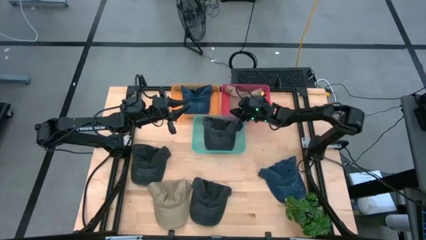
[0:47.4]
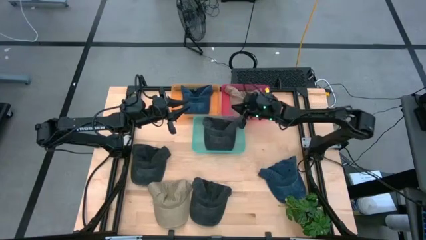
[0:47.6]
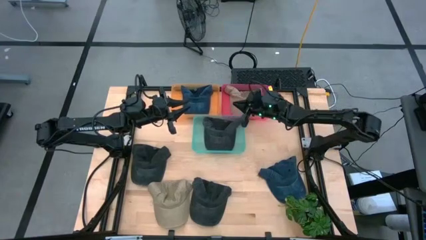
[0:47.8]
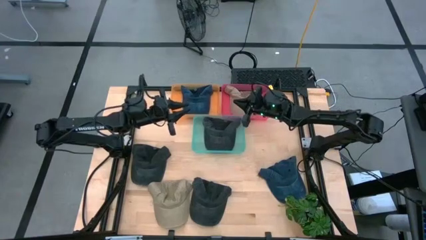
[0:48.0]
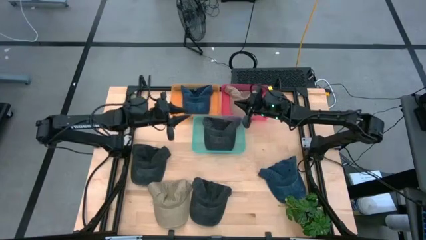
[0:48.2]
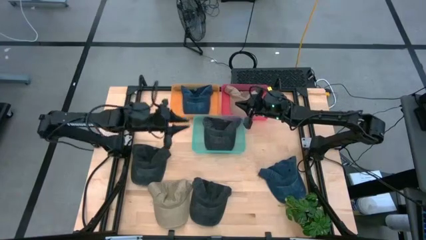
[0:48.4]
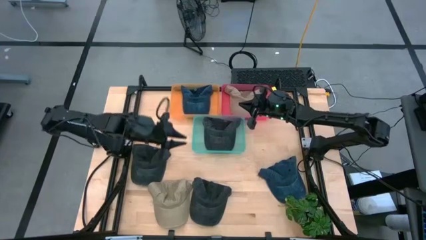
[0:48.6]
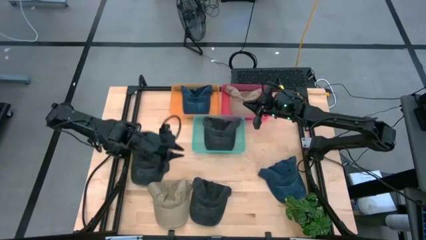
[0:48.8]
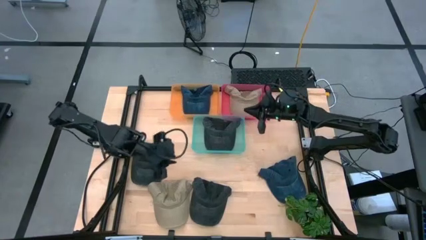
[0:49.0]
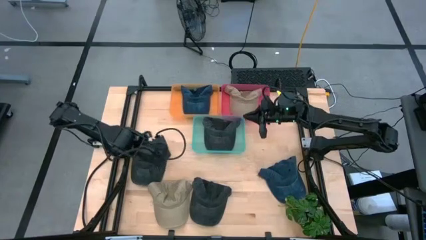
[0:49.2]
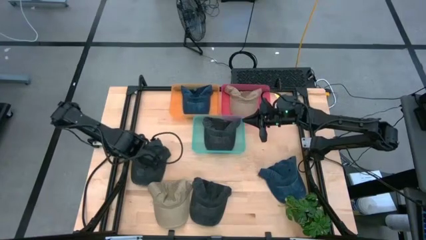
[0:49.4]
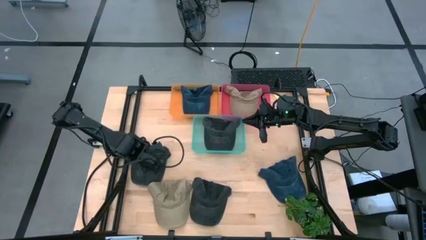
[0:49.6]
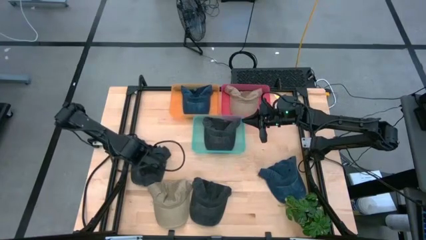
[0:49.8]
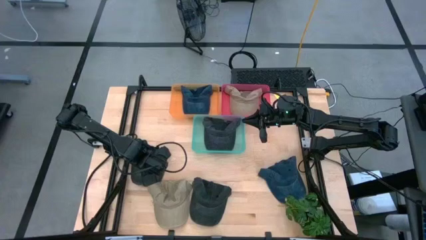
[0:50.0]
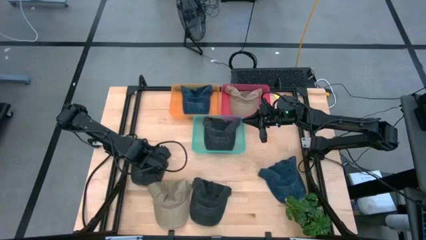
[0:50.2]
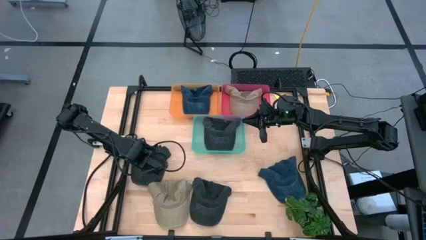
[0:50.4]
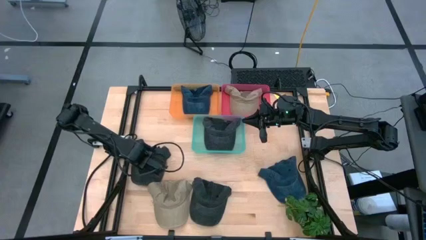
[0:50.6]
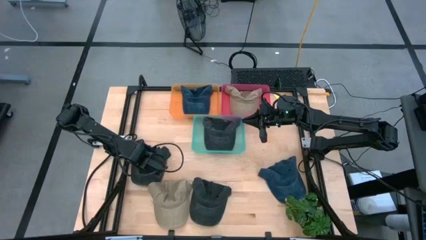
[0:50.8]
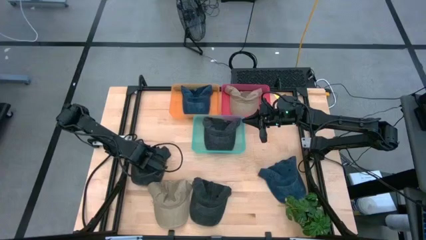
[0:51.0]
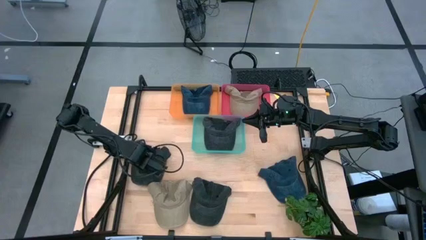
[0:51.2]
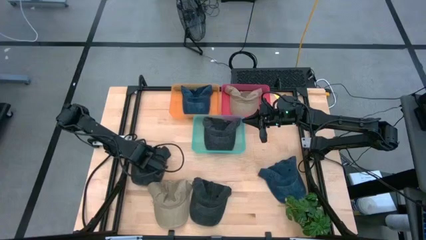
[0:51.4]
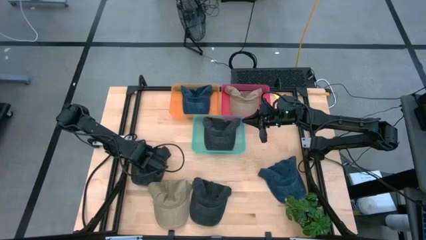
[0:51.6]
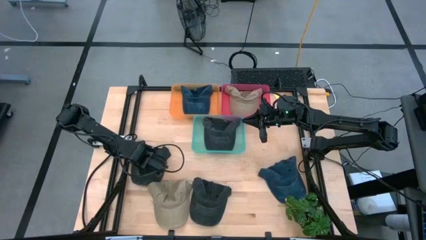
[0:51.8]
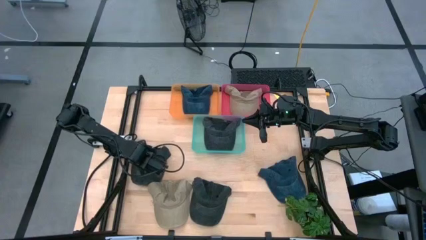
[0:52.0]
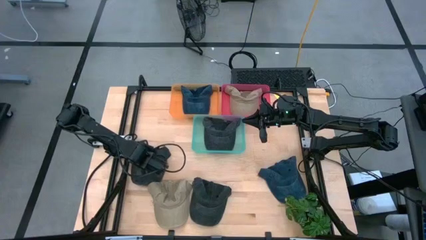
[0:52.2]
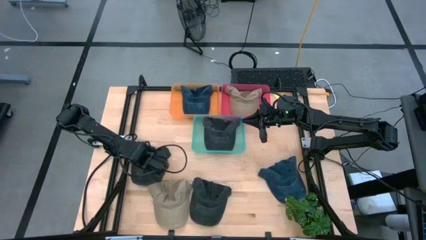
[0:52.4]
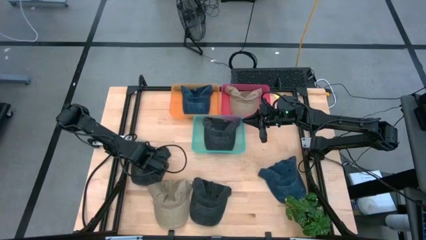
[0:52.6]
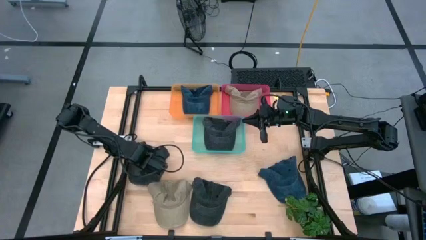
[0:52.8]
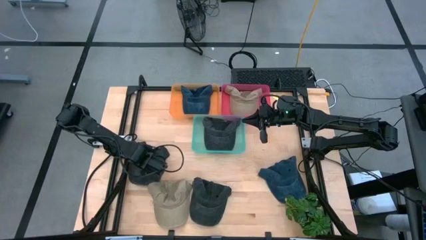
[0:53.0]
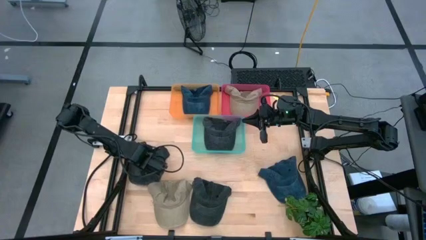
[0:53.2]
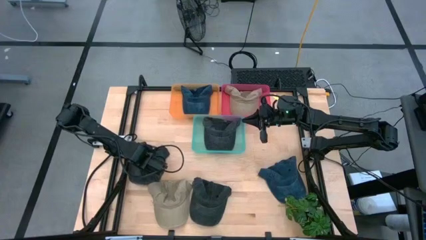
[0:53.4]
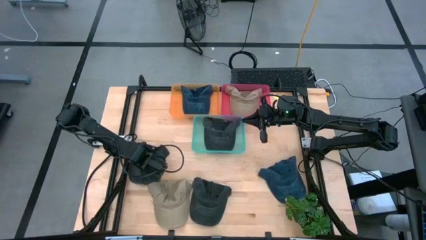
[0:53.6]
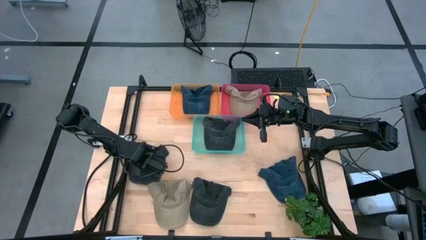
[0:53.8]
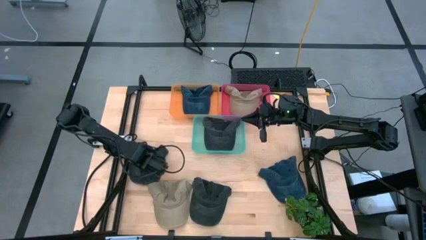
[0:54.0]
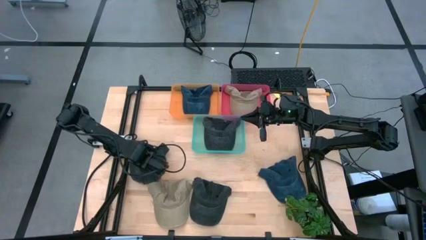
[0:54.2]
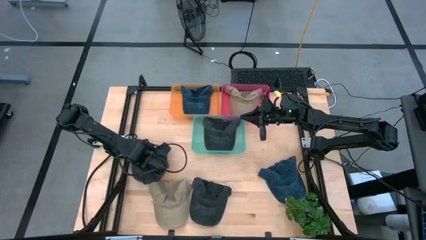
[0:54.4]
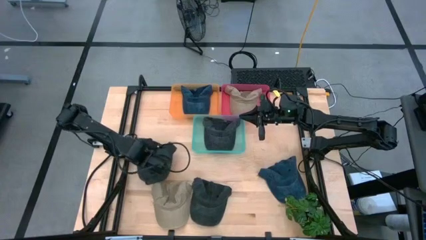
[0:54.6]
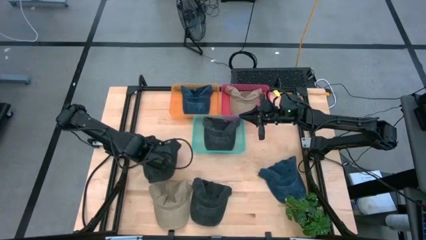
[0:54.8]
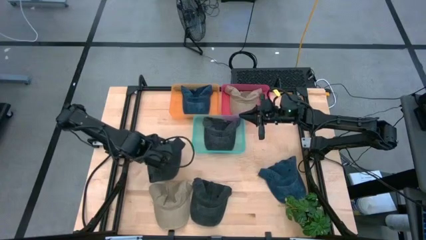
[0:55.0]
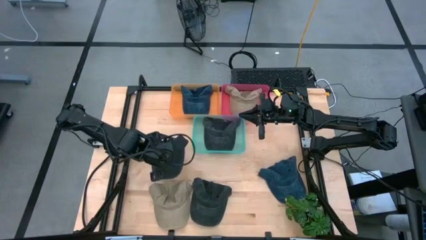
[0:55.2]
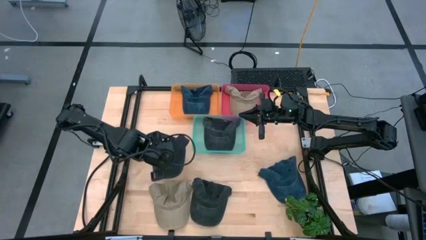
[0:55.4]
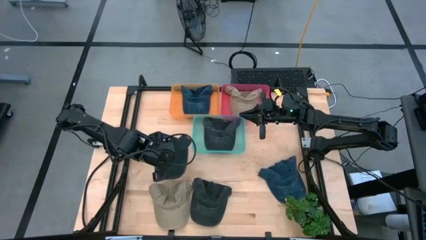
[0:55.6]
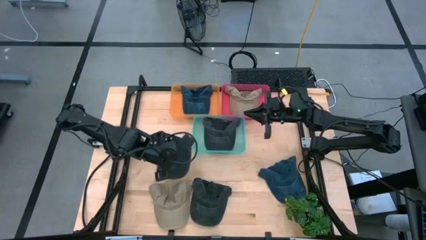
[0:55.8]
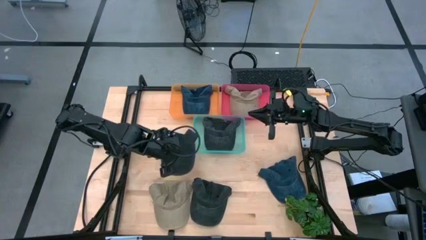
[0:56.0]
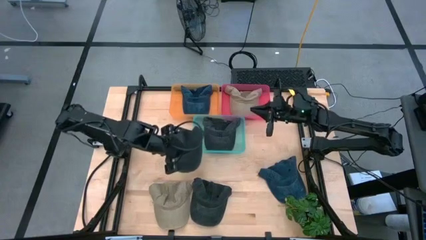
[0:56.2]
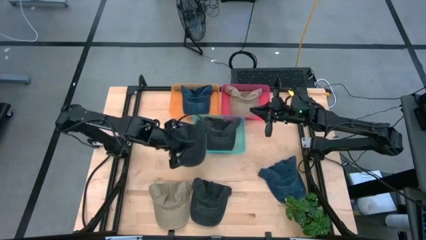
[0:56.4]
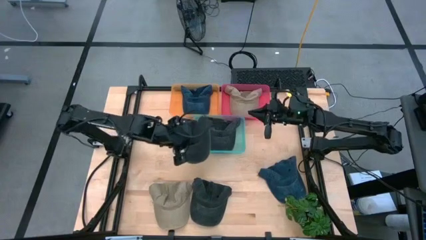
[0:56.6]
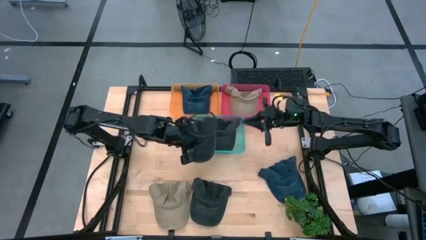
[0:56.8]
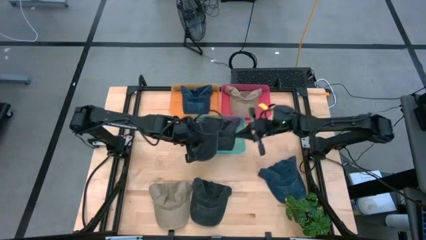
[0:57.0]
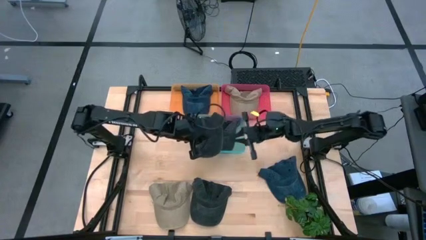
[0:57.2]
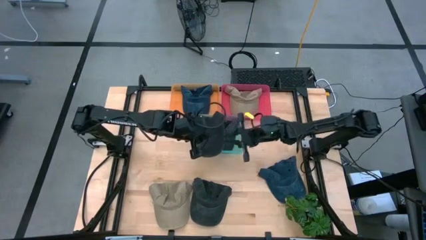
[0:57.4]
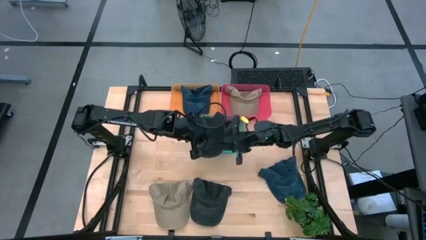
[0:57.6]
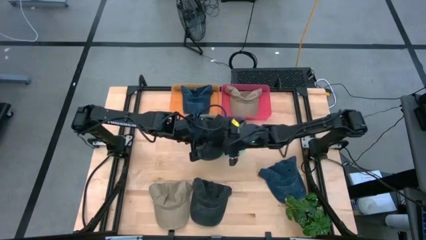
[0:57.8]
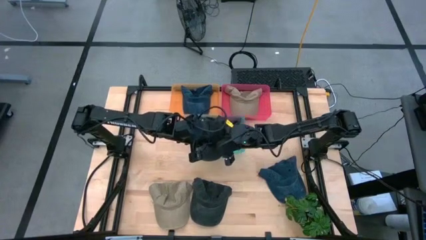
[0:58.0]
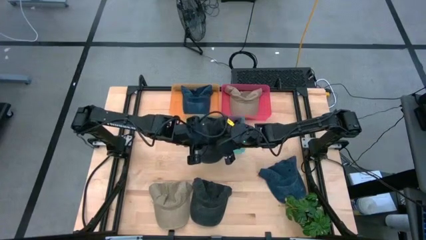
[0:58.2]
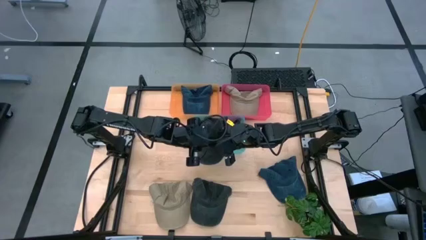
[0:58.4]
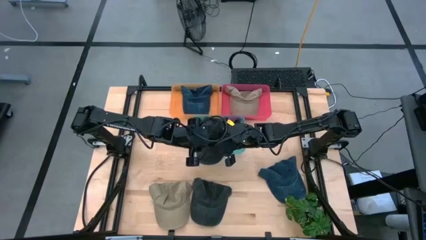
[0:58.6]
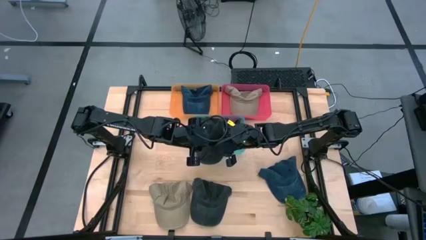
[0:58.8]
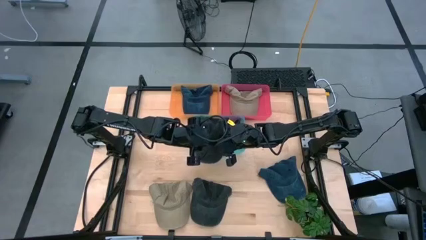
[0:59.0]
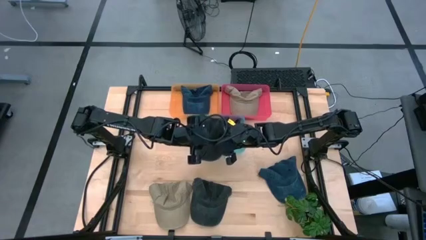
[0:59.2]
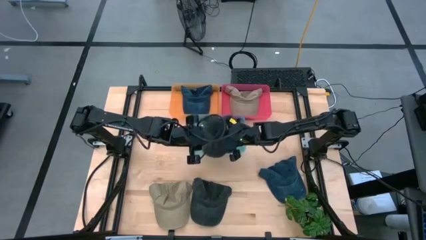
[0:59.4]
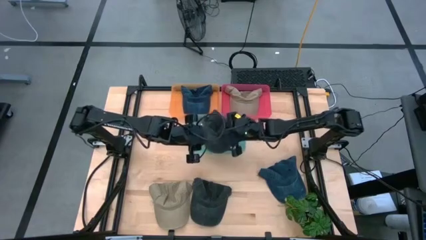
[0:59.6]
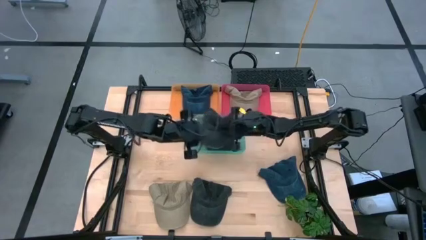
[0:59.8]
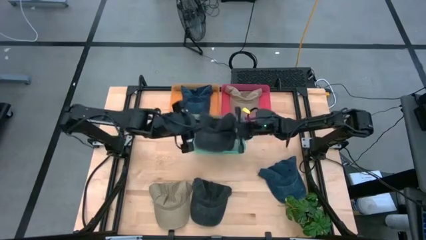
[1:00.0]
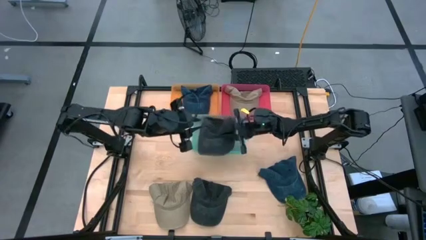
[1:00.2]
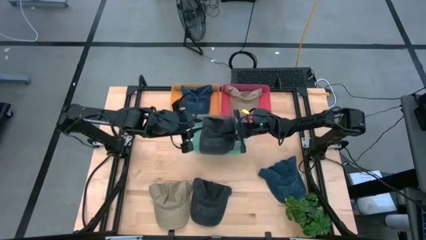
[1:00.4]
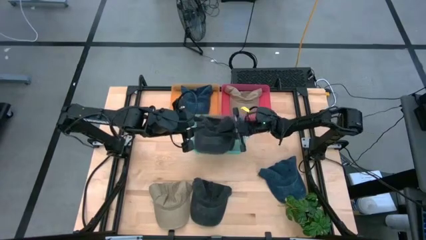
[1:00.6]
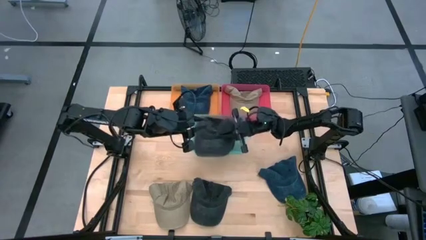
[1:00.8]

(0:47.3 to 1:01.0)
Task: Pick & Place hat
Put the top black cap into the blue bin

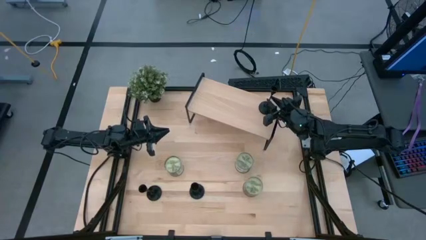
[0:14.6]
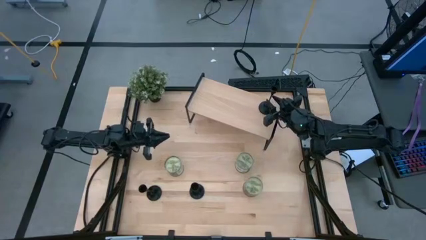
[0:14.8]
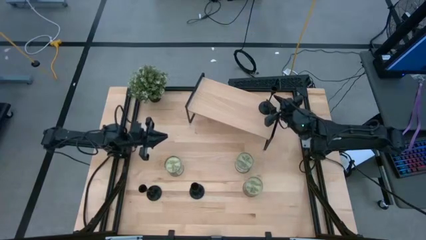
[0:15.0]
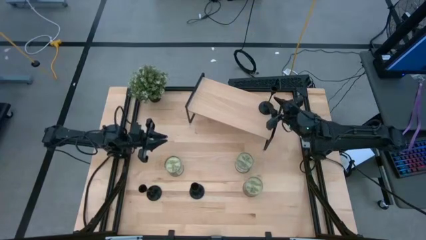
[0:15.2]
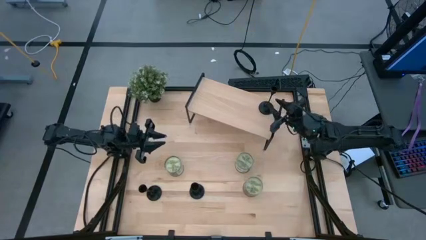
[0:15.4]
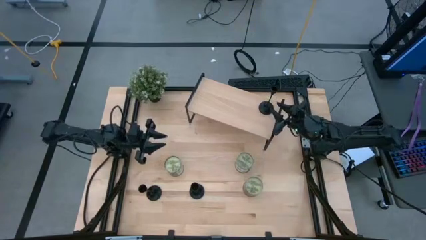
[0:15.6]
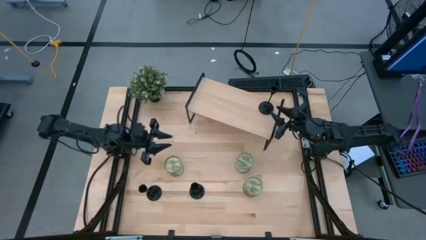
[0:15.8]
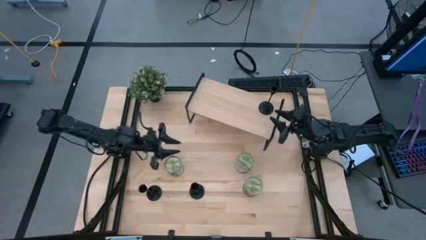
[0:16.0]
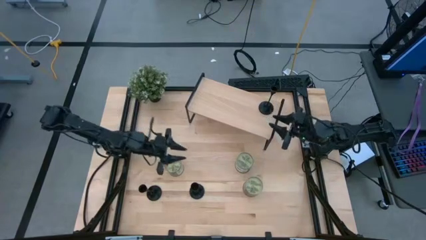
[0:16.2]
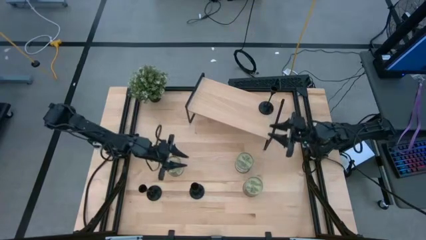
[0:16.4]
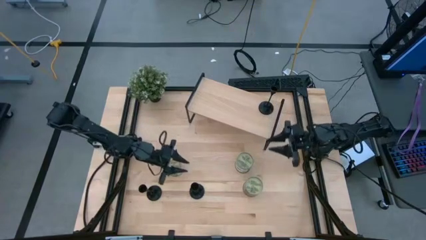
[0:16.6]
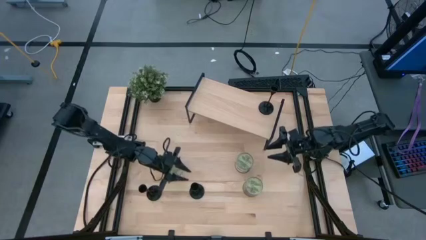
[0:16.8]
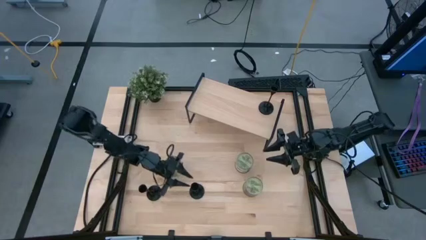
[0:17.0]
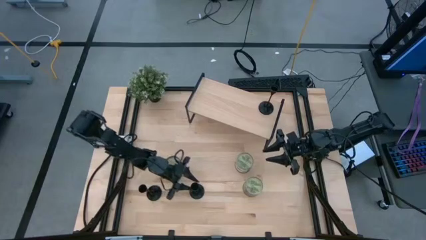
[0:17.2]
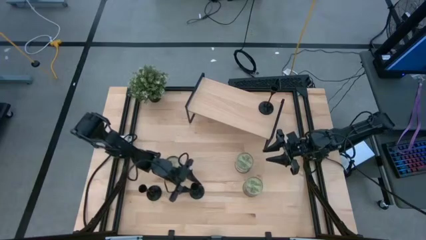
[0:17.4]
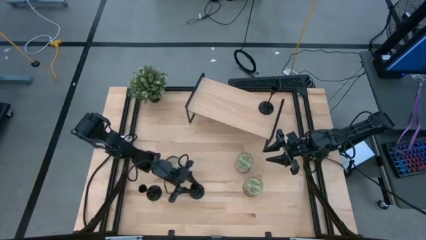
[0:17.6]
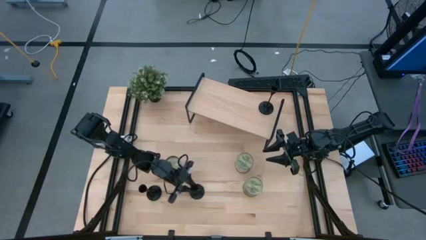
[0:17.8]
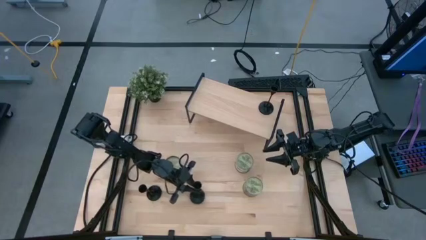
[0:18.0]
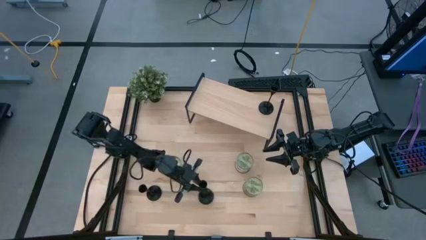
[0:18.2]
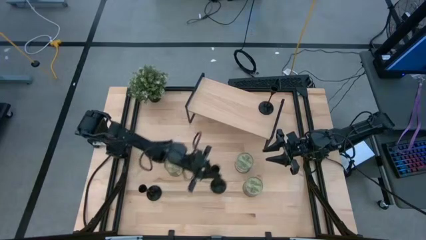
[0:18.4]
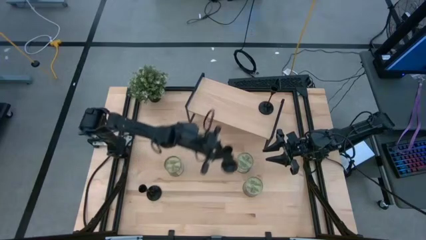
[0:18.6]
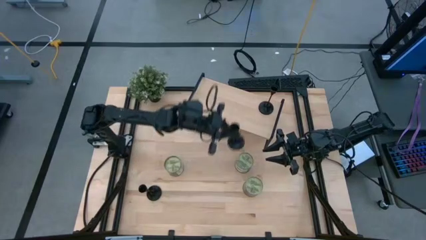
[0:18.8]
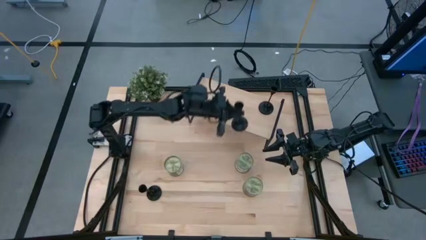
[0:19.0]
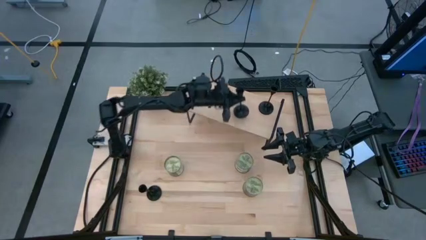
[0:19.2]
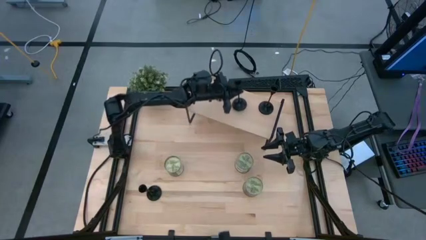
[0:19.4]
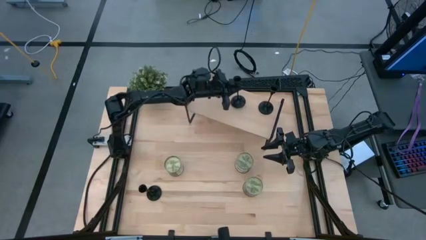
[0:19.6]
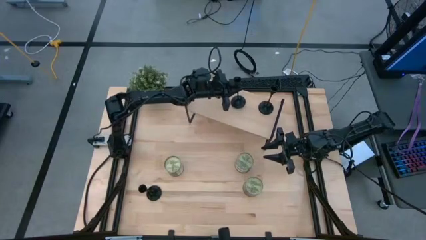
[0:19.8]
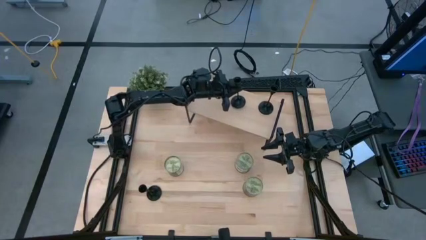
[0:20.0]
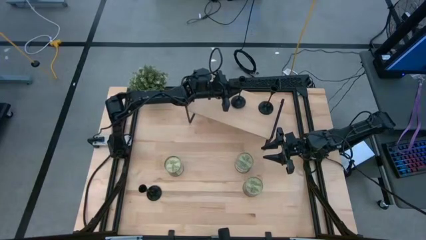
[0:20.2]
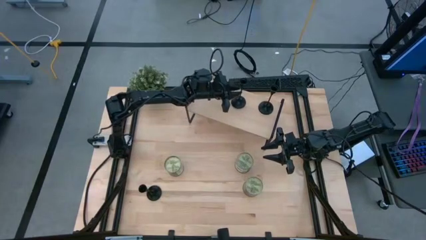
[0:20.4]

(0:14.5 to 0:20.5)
Task: Pick & Place candle stick holders
Align the right black candle holder with the other black candle holder on the shelf
